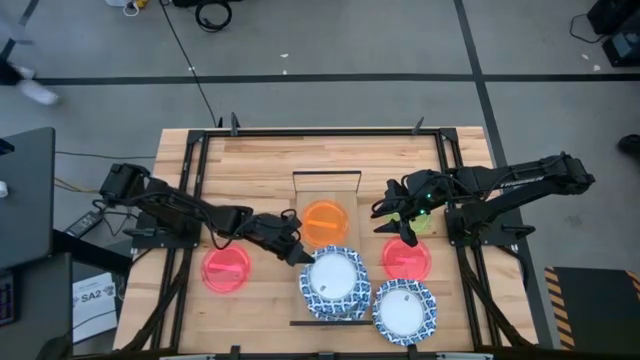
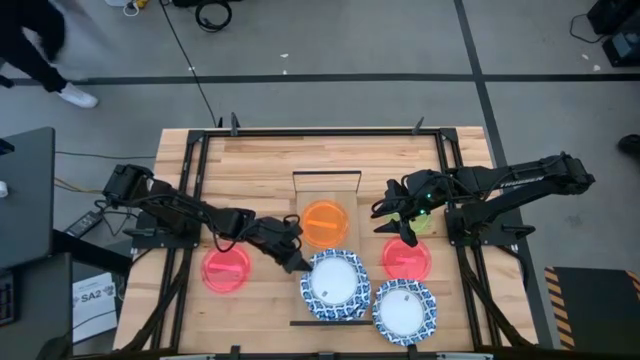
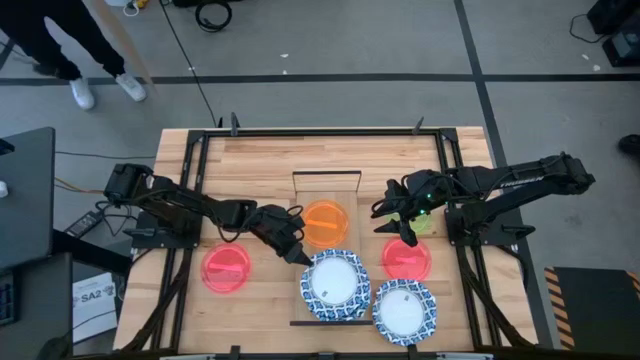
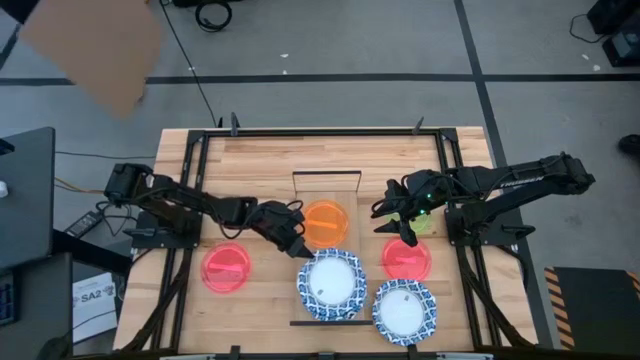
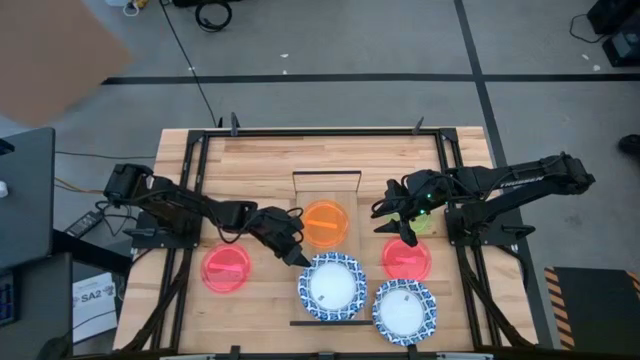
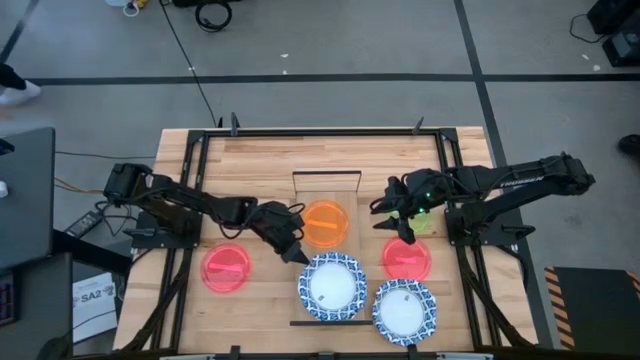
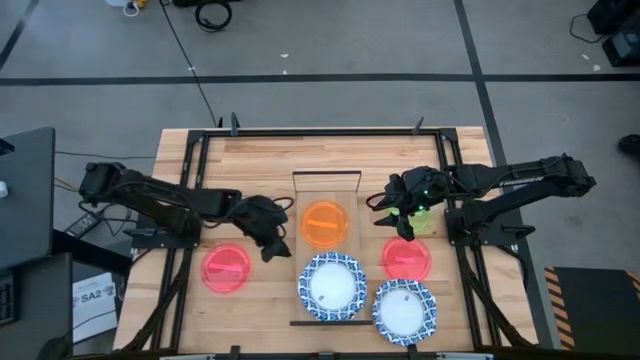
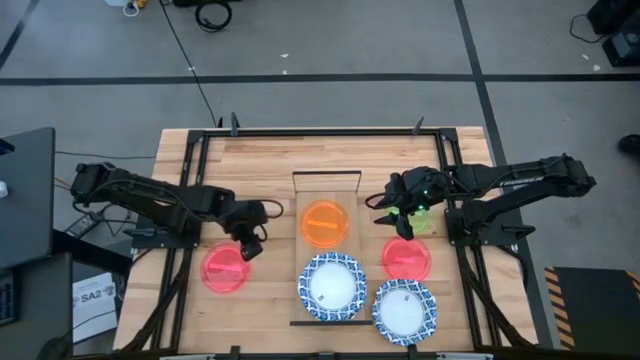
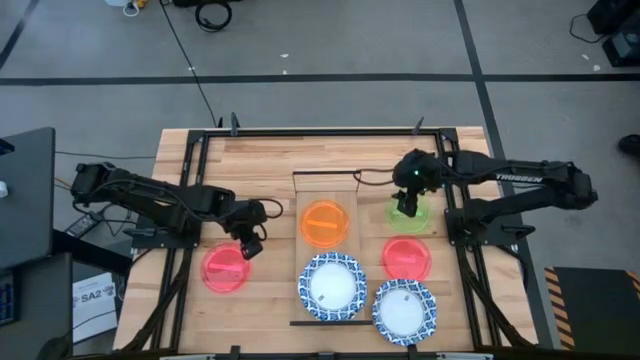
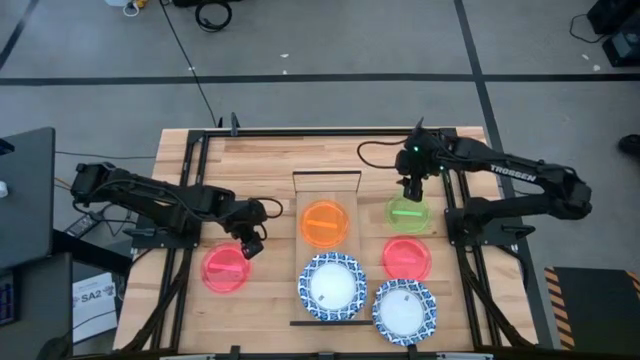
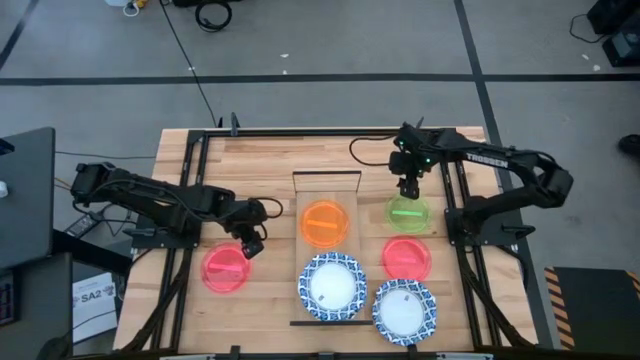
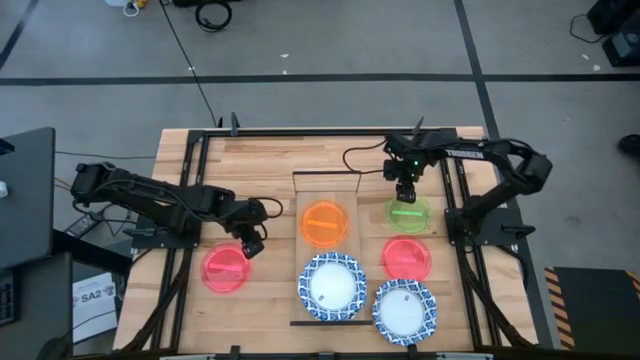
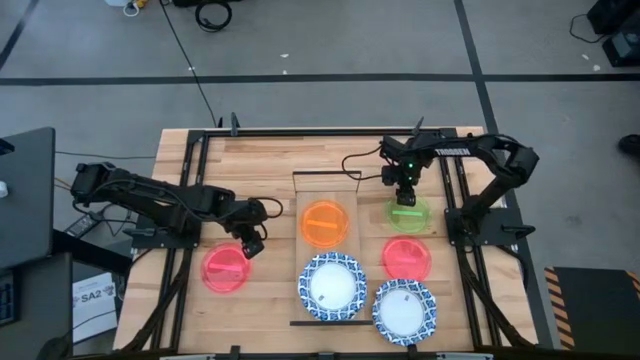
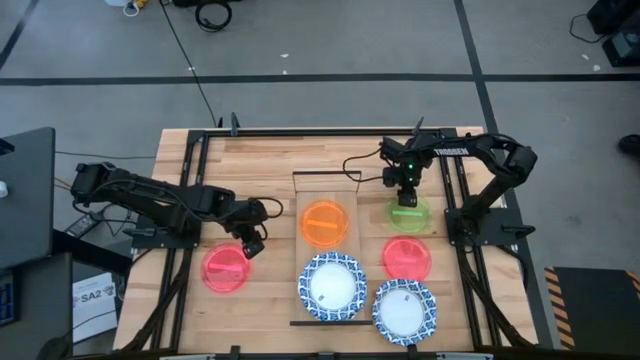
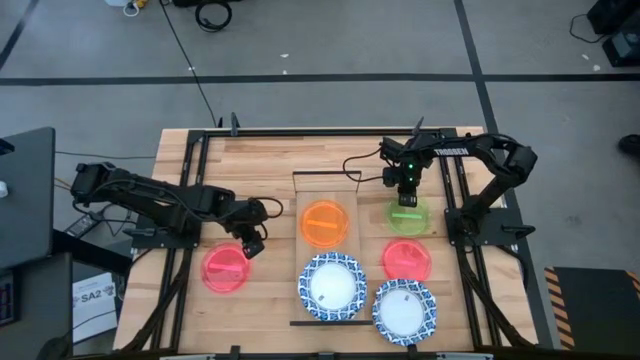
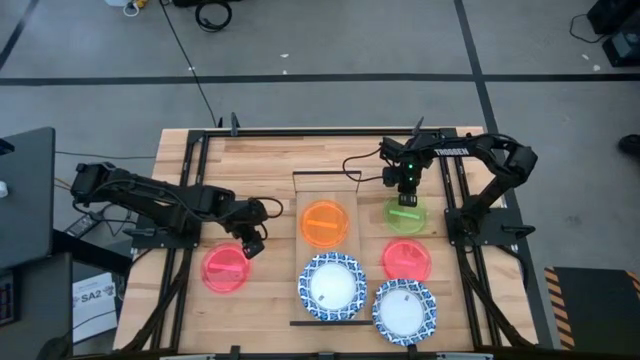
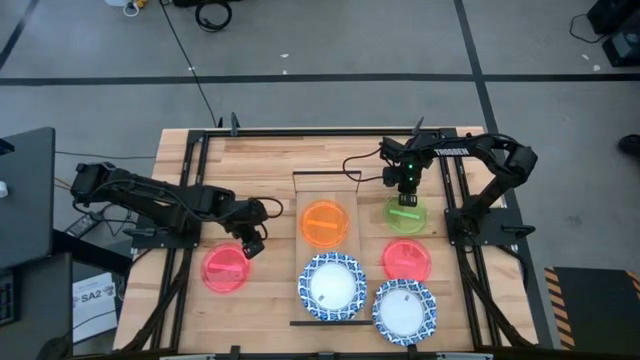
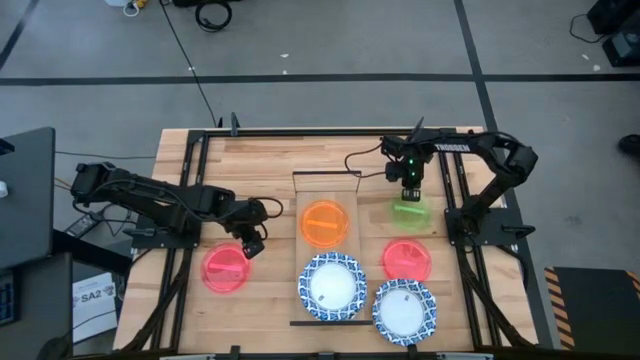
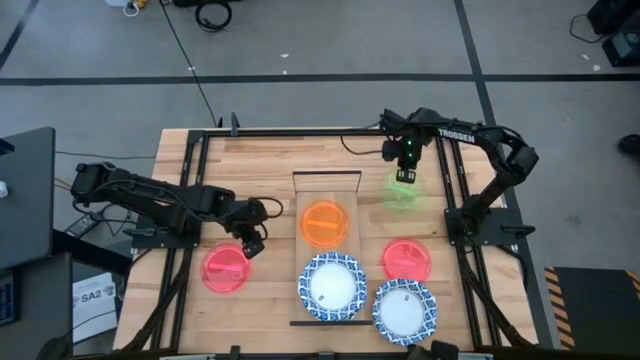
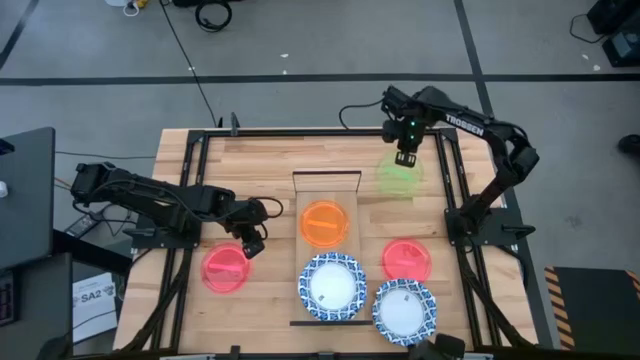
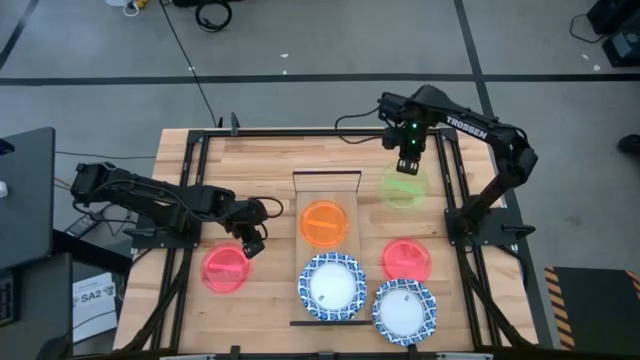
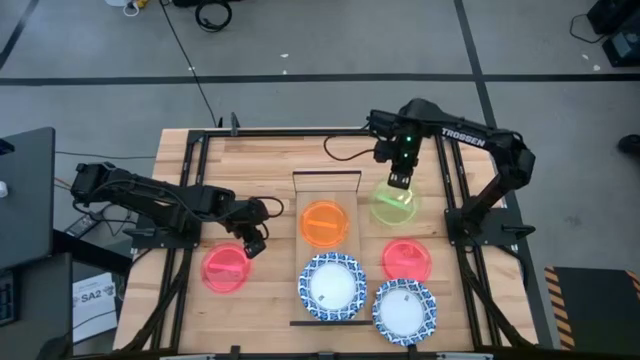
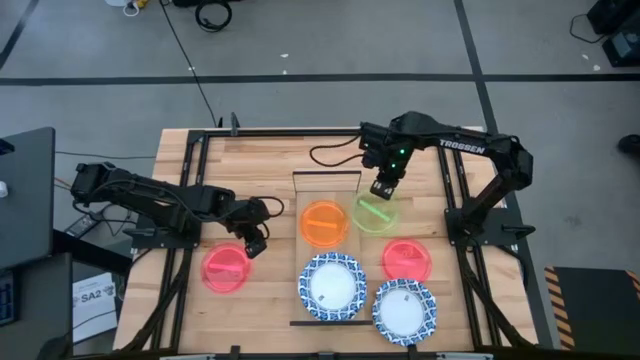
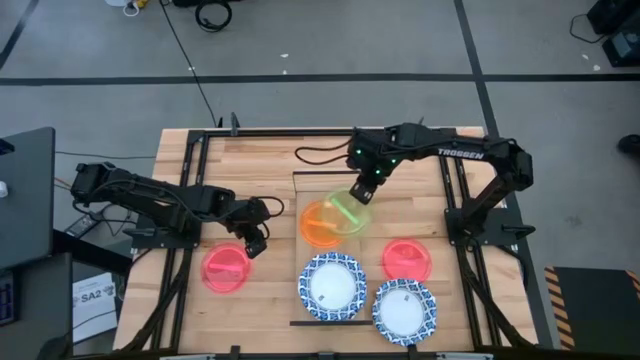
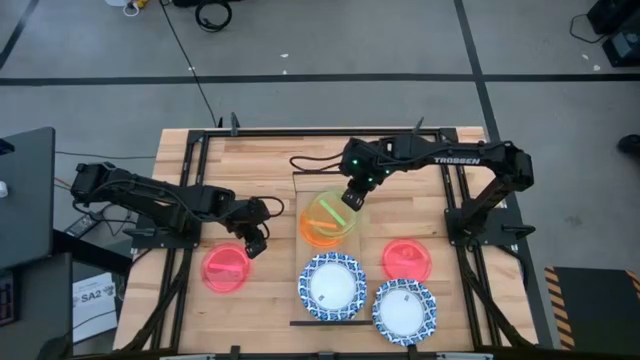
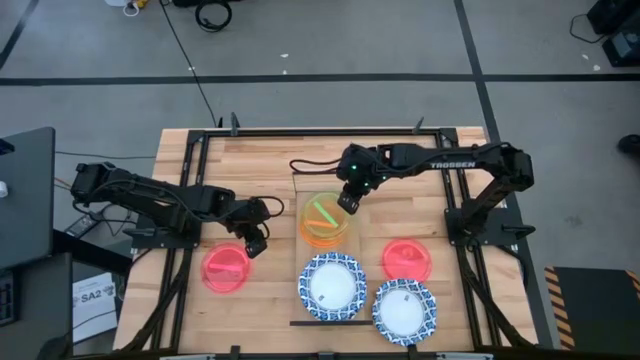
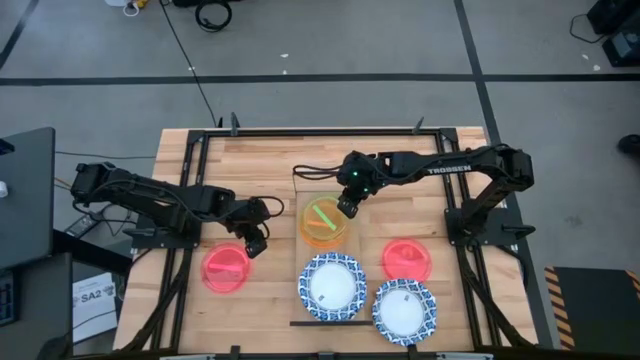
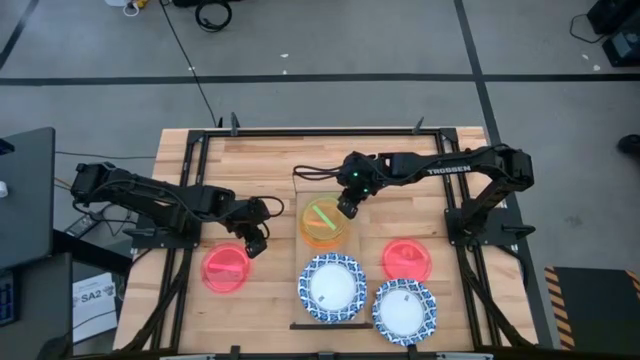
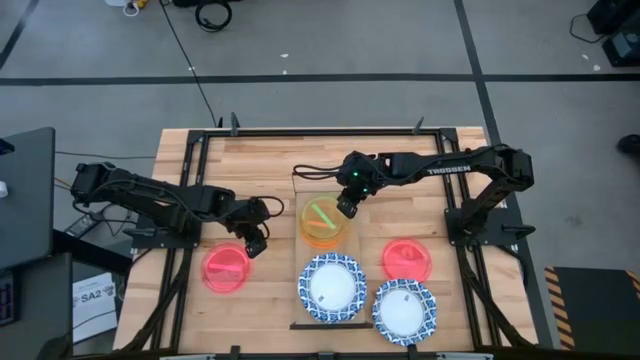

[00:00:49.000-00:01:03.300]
Task: Place and stack plates onto a shelf
Stack the green transparent plate on the orange transparent plate on the shelf

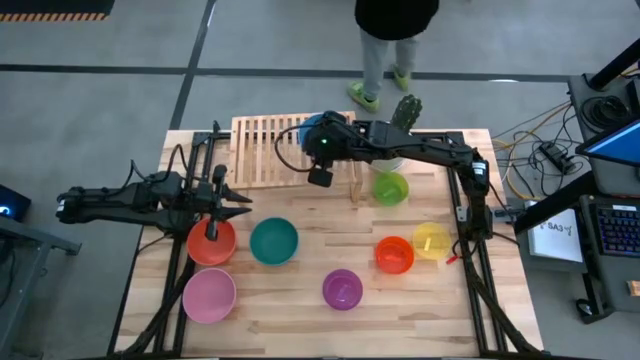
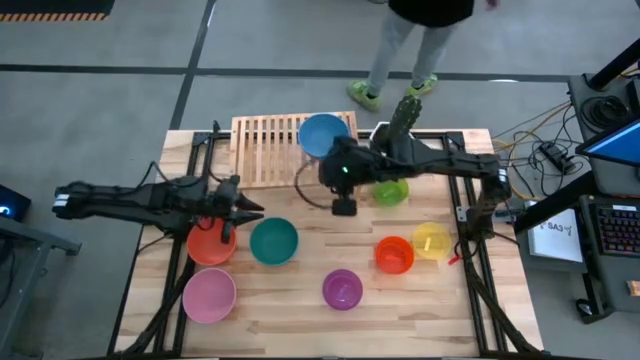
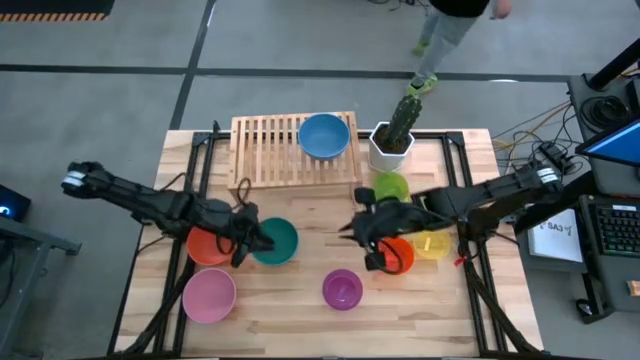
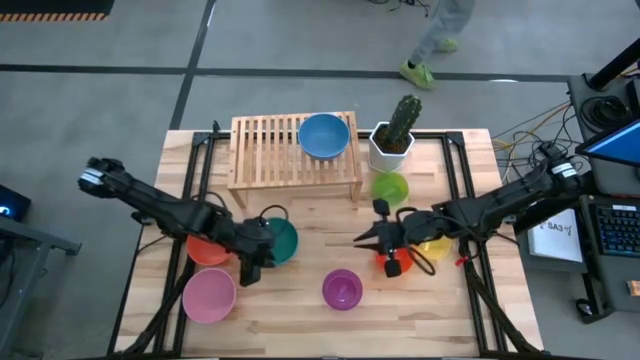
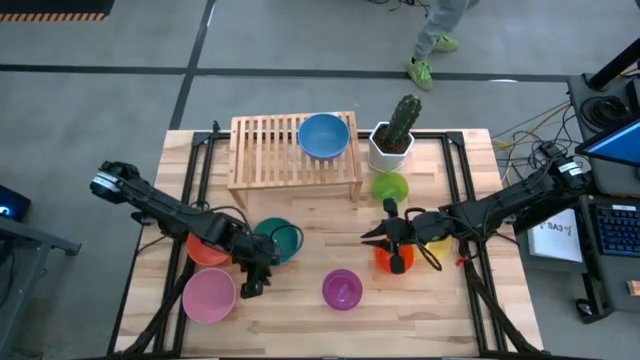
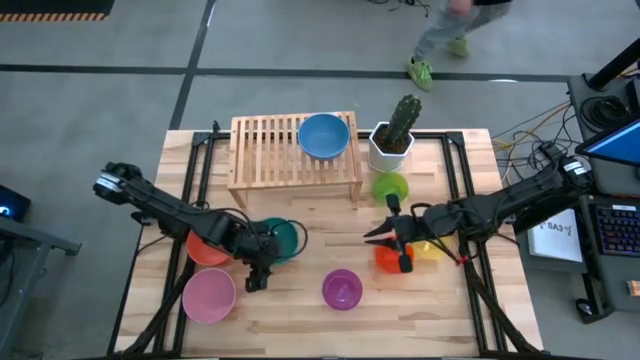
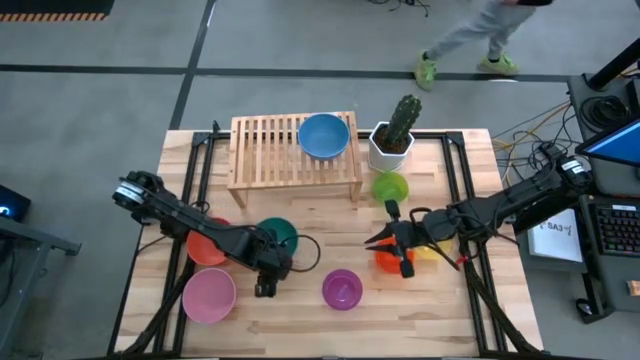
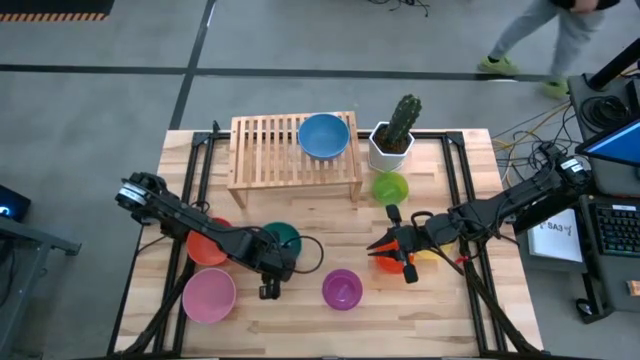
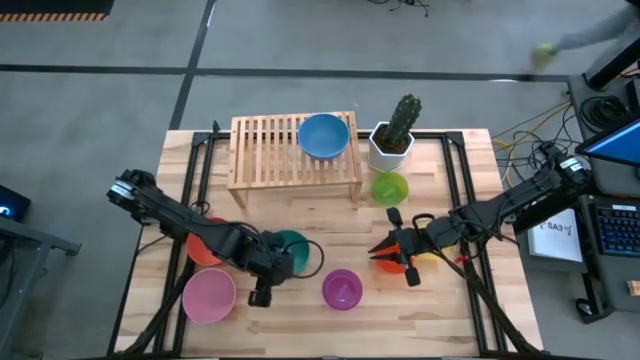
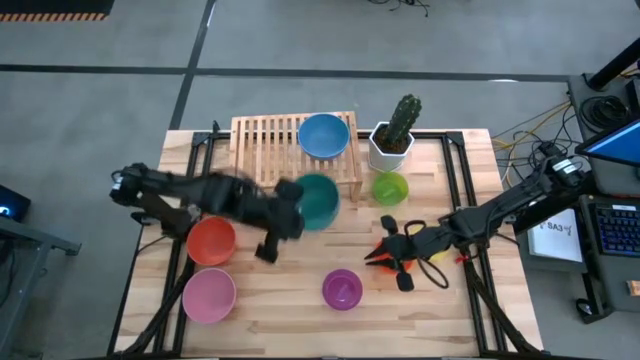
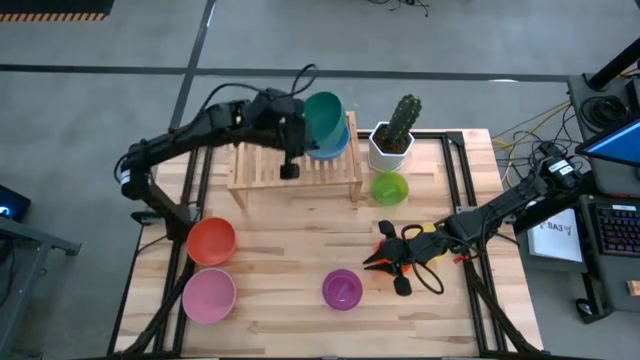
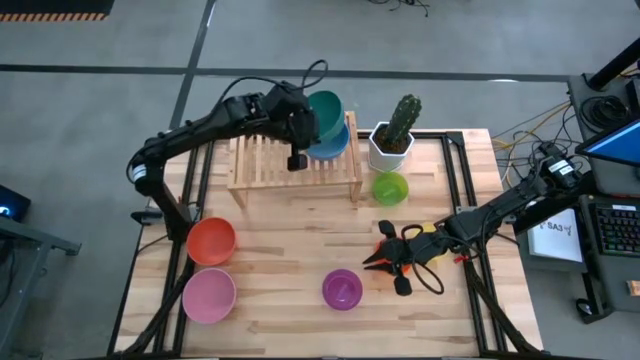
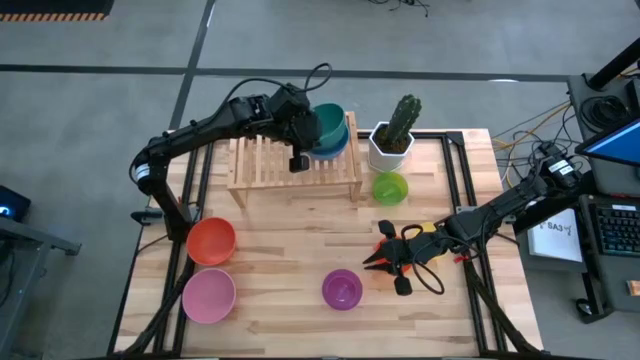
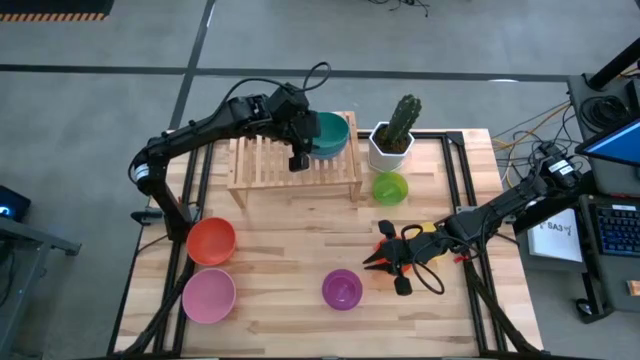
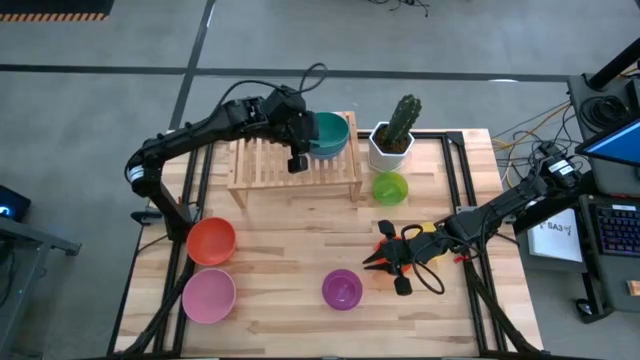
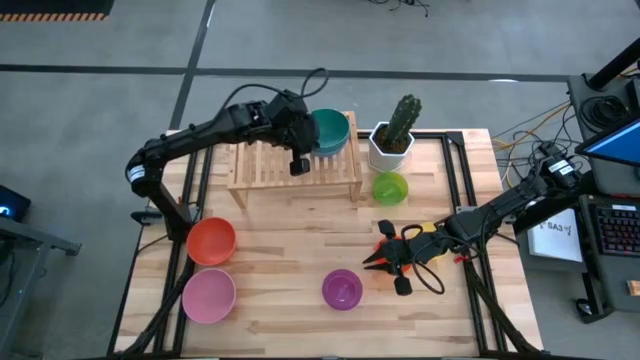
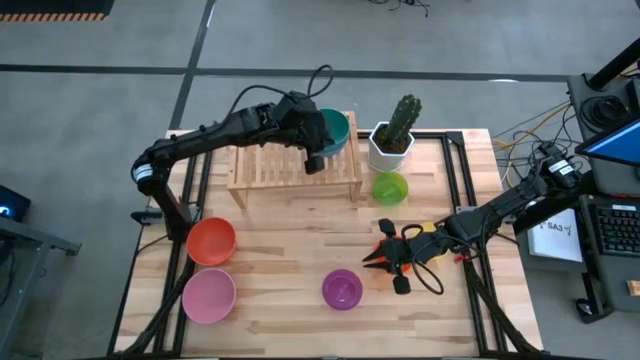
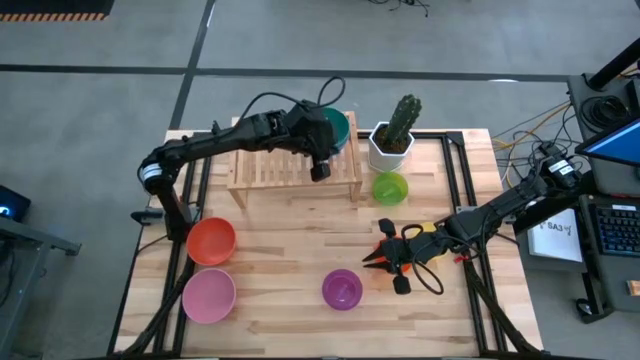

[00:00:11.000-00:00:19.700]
Task: Place and stack bowls onto a shelf
Stack the green bowl on top of the blue bowl on the shelf
